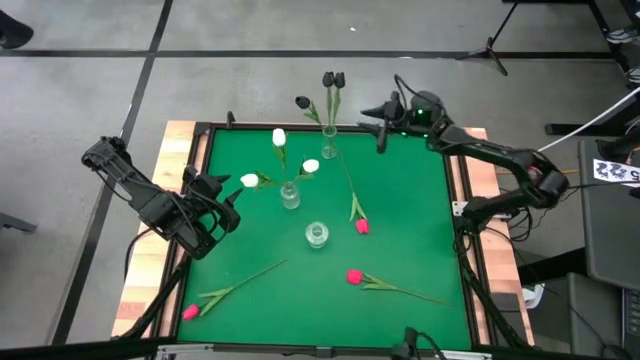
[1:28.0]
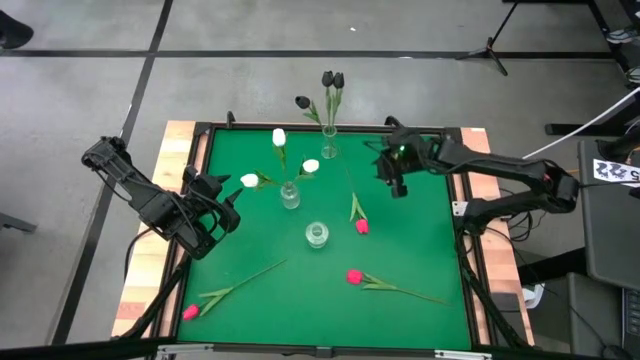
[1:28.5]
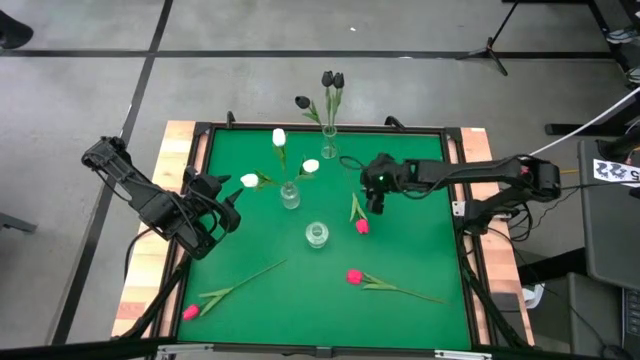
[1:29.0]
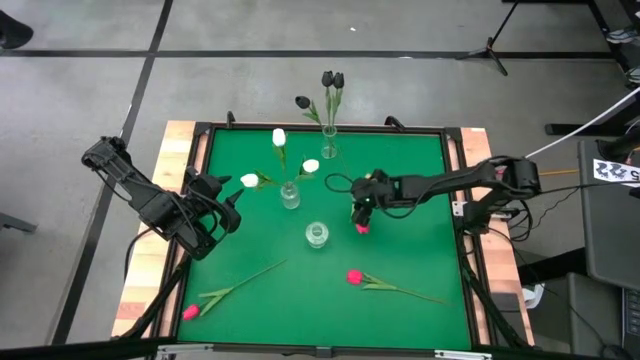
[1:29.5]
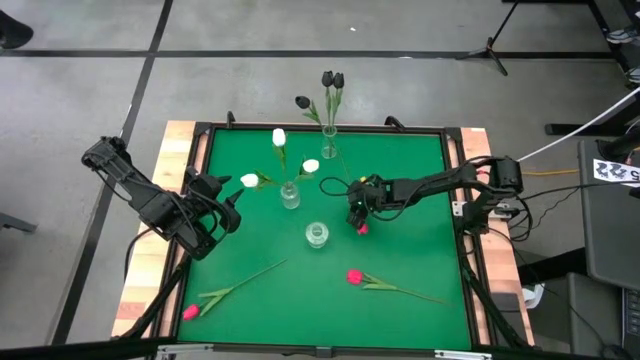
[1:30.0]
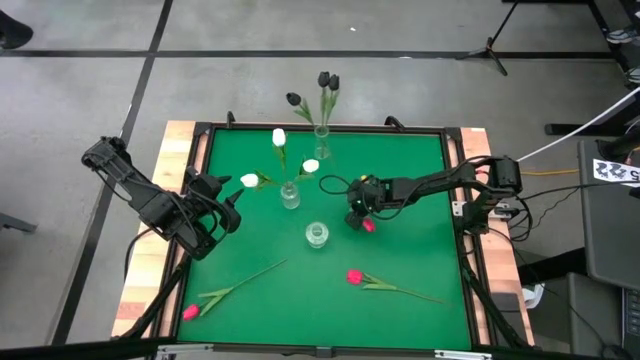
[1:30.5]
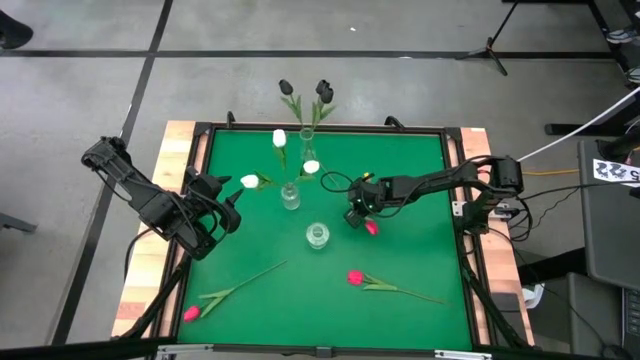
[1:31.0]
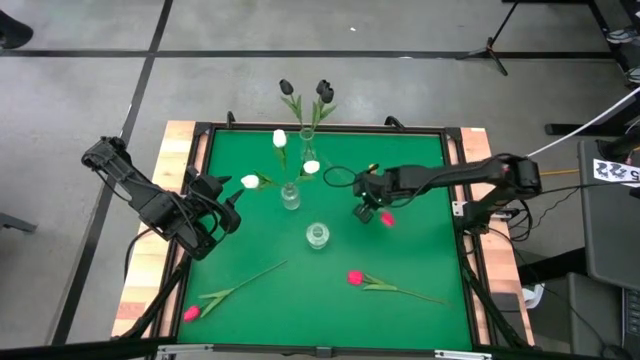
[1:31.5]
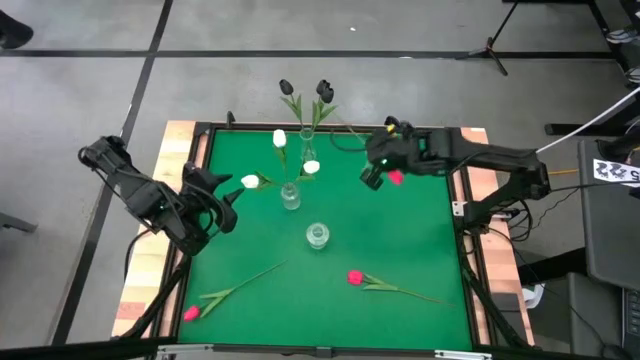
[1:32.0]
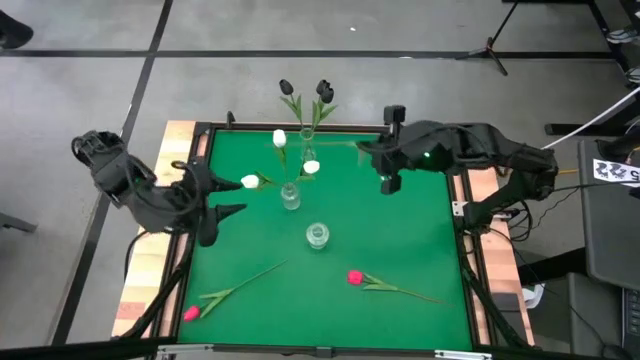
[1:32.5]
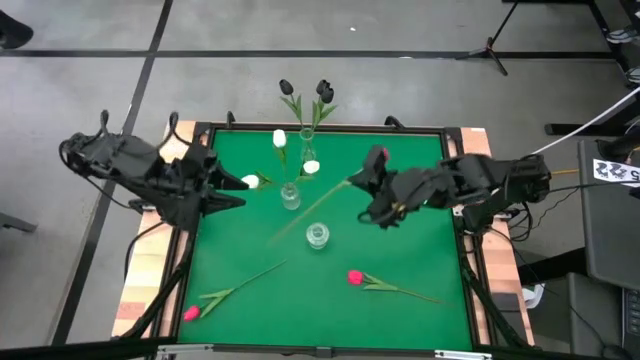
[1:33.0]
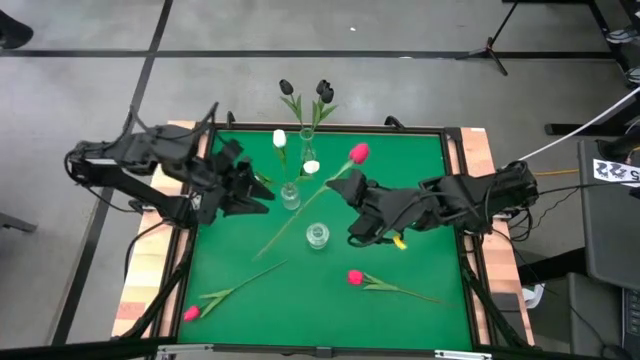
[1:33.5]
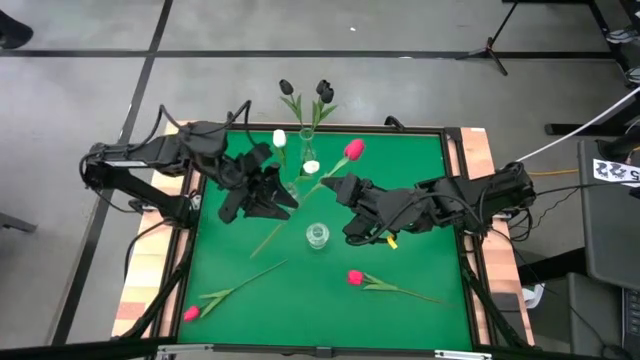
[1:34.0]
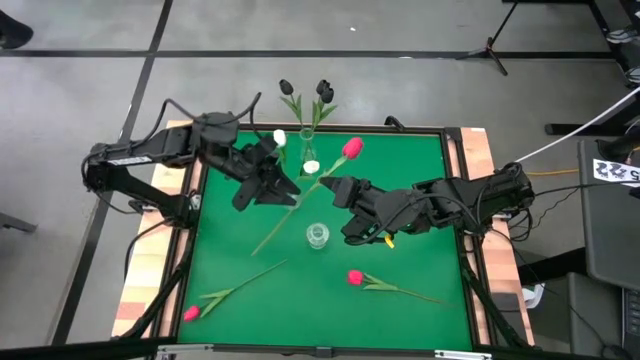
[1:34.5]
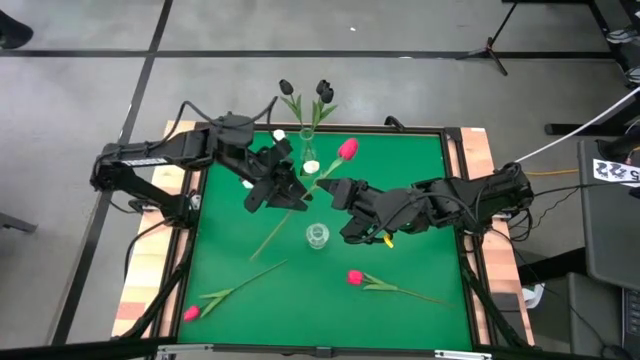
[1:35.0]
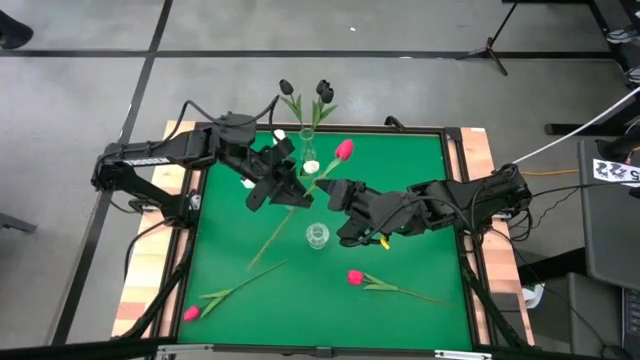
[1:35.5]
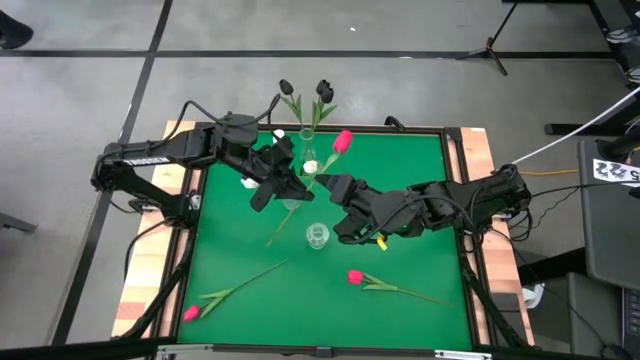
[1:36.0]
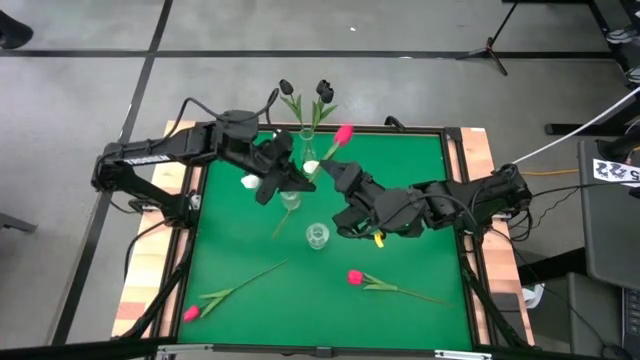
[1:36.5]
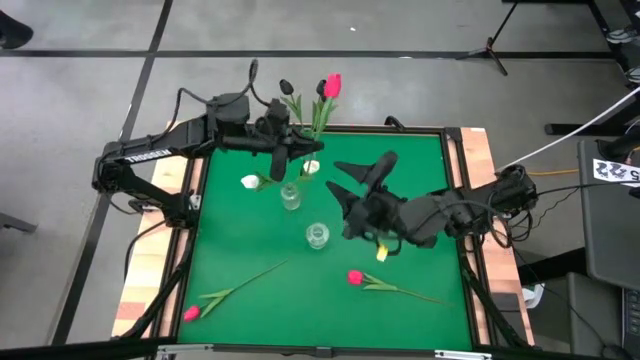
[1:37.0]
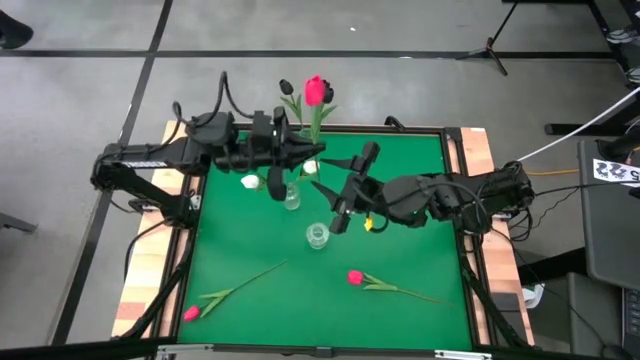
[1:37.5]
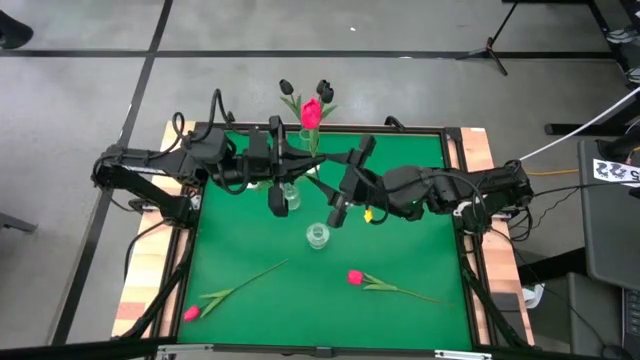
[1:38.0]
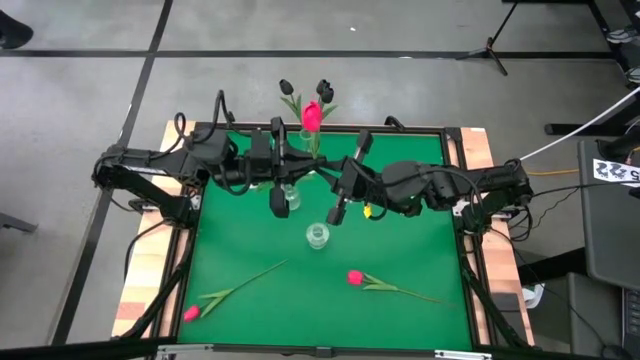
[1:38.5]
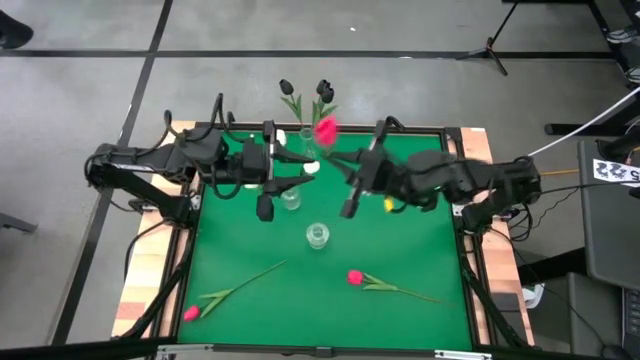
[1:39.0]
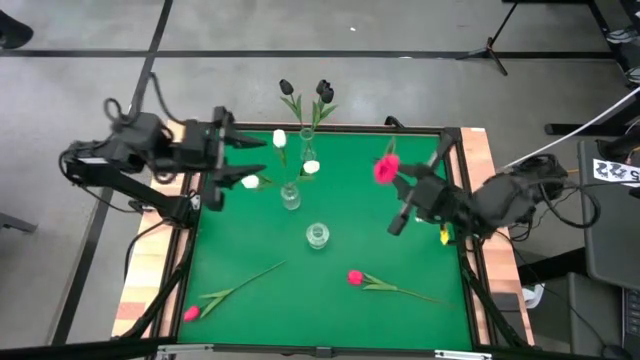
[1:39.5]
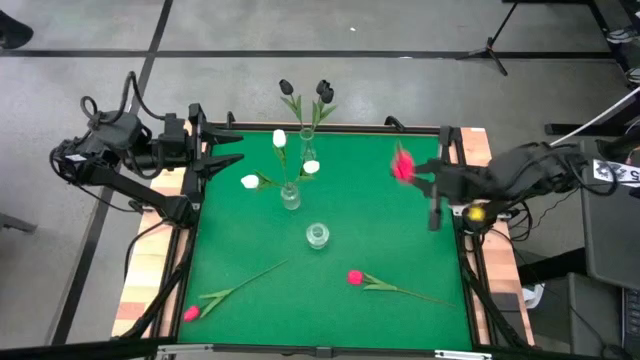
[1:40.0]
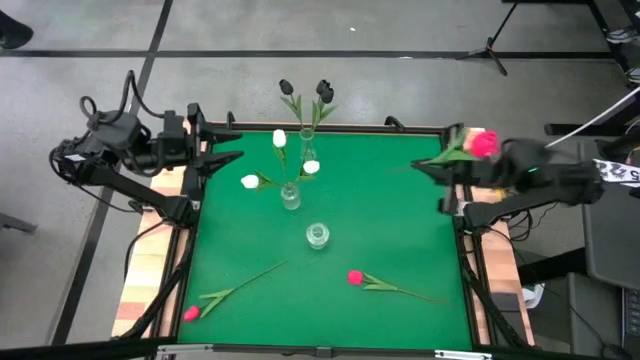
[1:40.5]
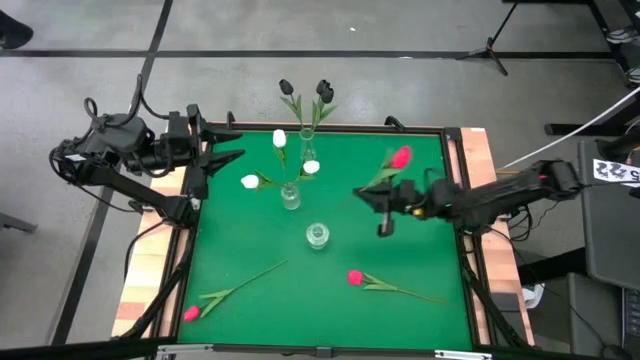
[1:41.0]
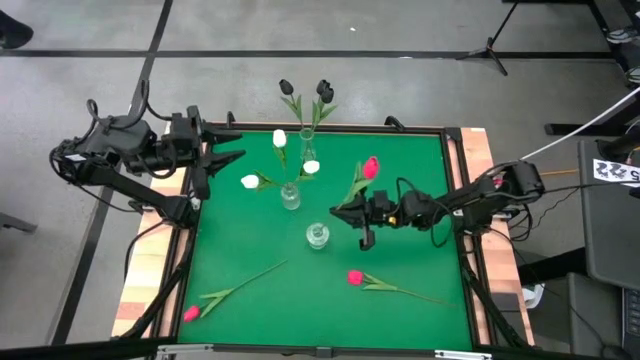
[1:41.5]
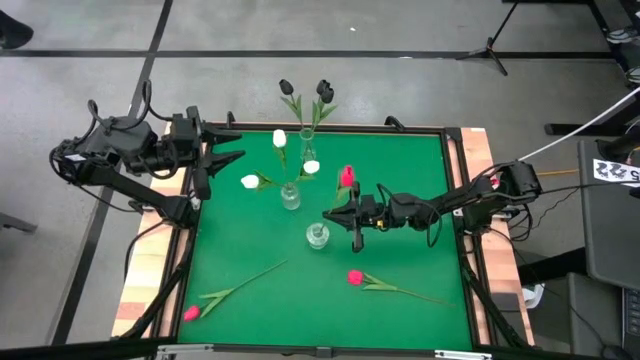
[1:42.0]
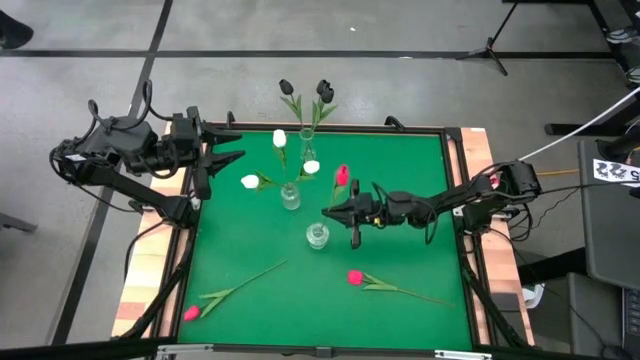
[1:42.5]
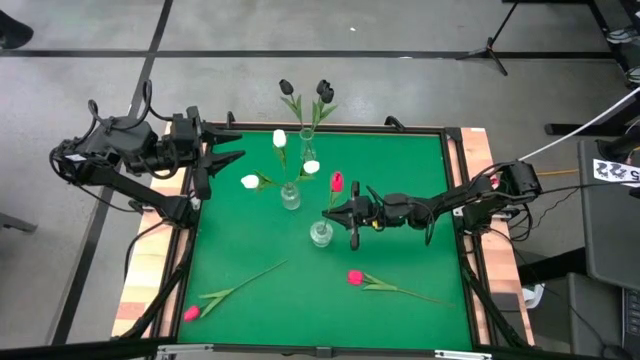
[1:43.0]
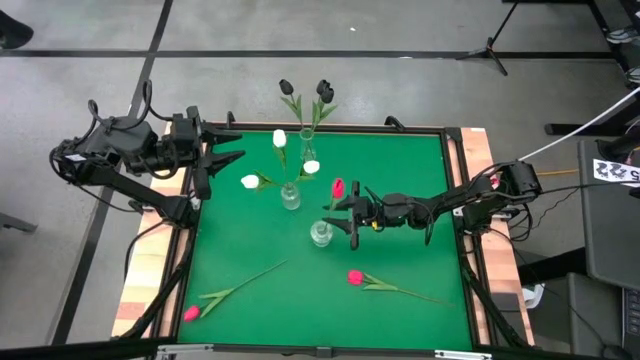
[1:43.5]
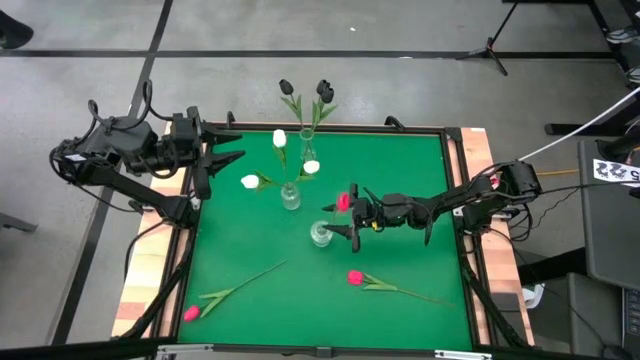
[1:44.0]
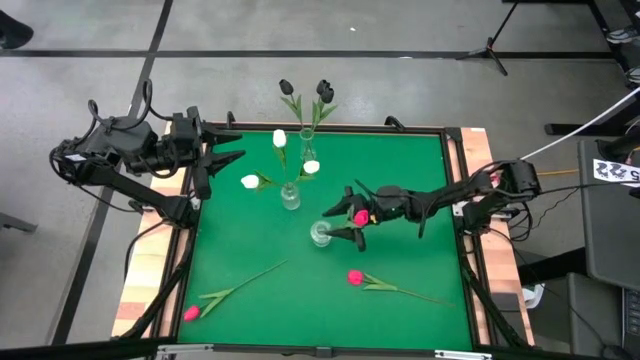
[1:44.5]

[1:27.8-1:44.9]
Task: Sort flowers into vase by color
Put the top pink flower into the bottom transparent vase

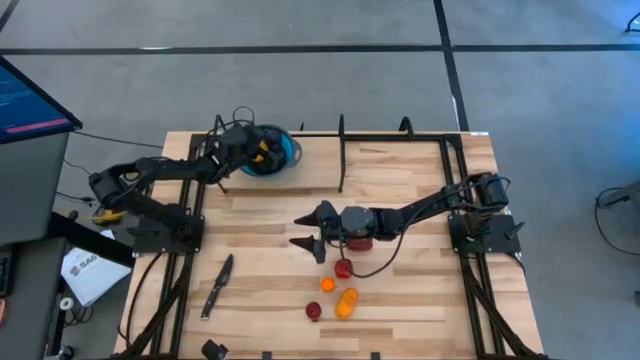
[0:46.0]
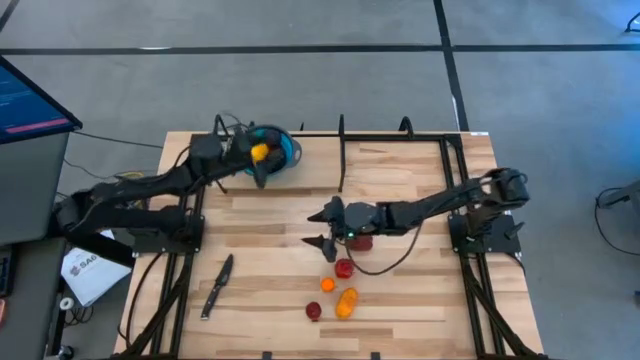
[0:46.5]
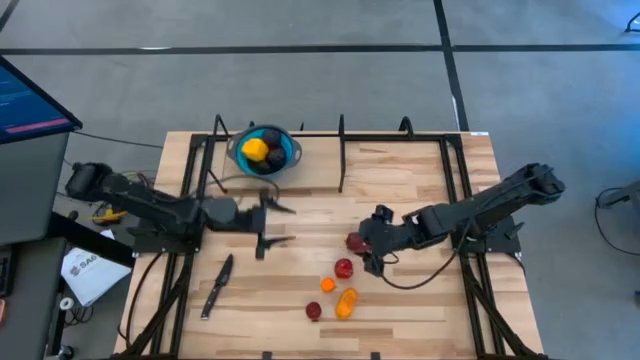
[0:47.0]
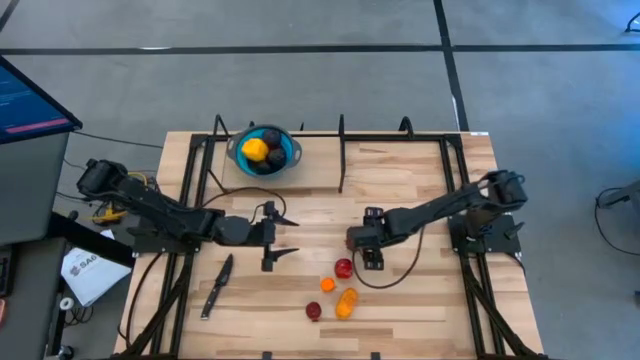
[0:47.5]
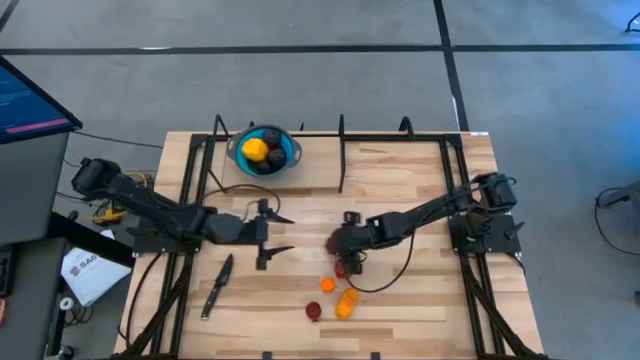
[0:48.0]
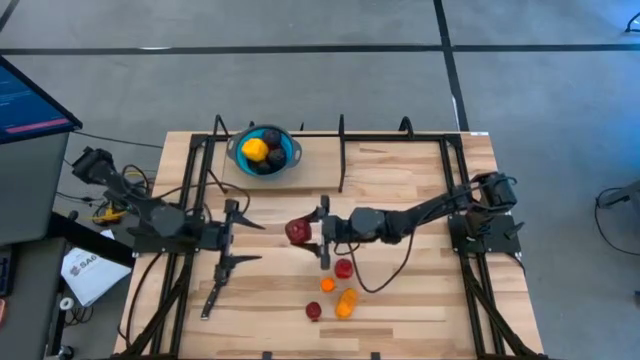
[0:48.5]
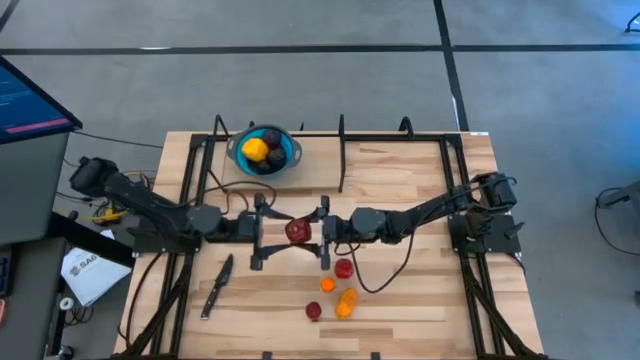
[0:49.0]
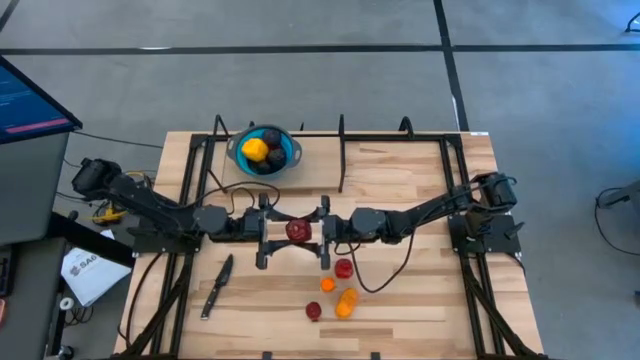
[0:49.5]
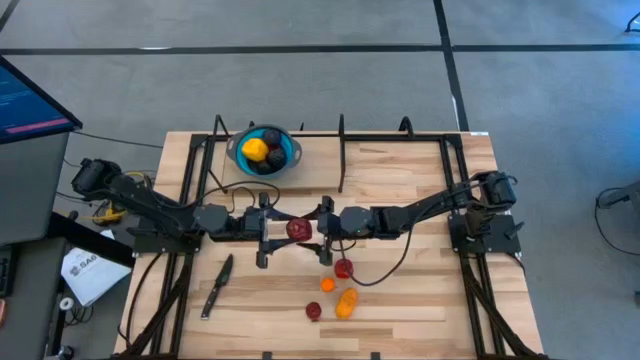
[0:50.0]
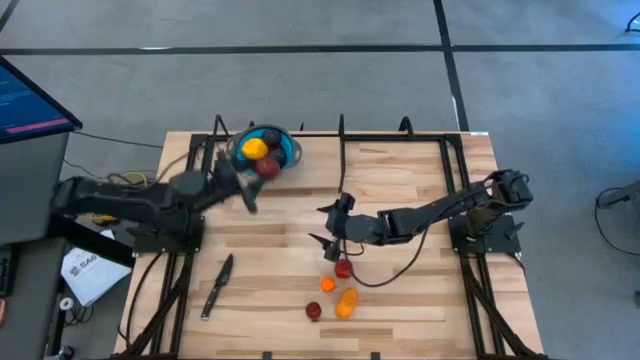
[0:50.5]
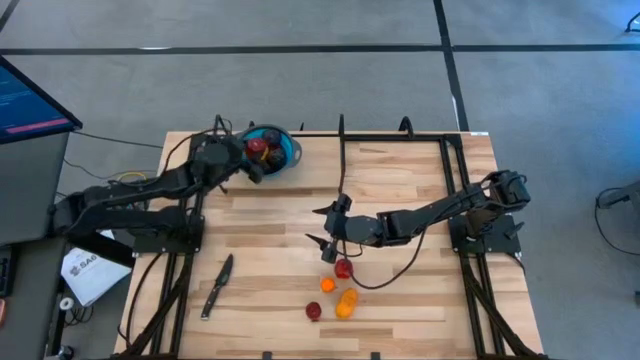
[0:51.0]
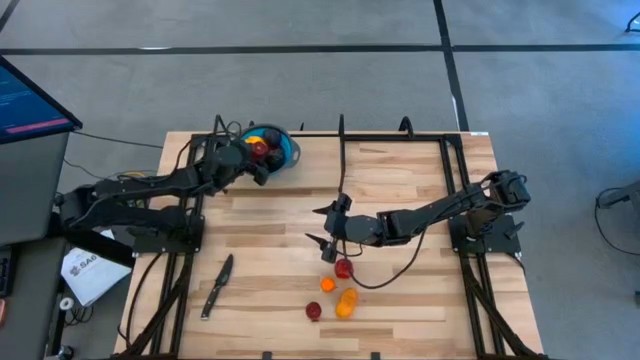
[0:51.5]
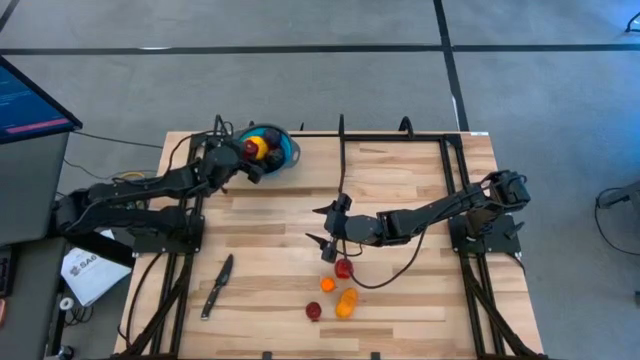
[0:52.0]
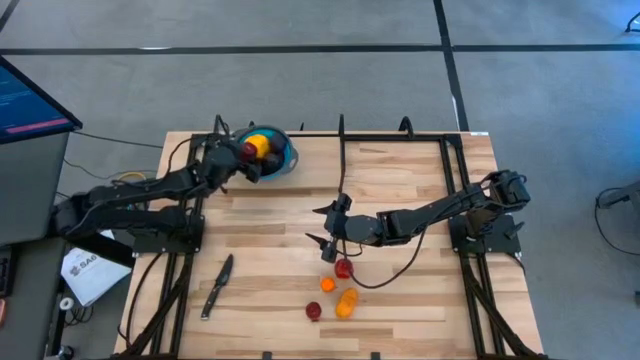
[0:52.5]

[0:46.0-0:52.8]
Task: Pick & Place Fruit
Put the top apple in the blue strainer bowl on the shelf
